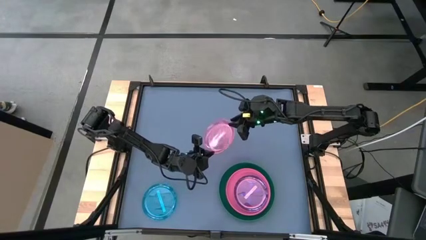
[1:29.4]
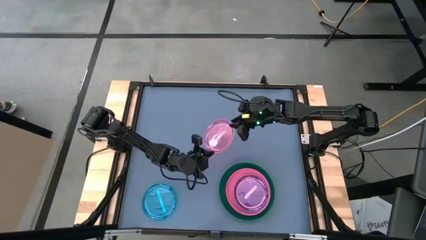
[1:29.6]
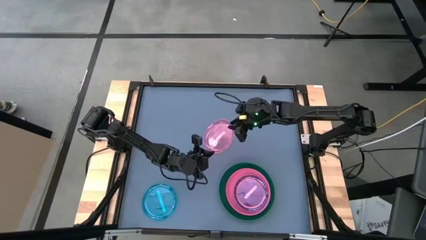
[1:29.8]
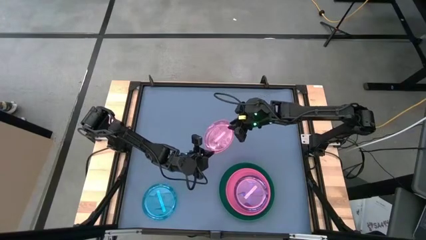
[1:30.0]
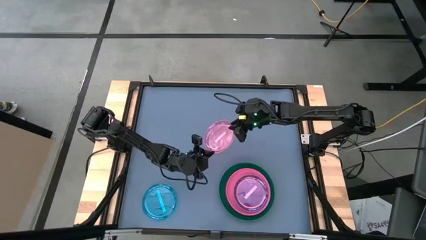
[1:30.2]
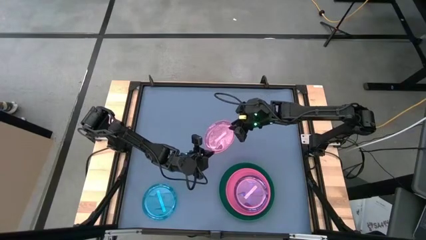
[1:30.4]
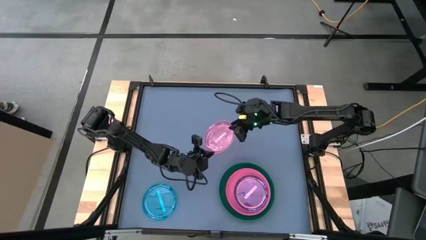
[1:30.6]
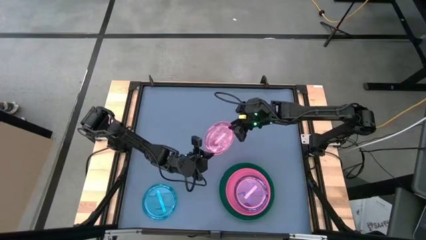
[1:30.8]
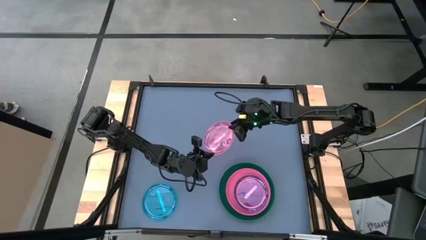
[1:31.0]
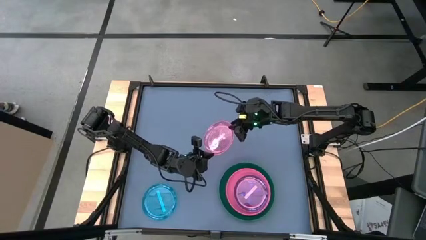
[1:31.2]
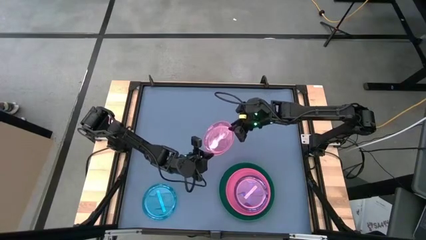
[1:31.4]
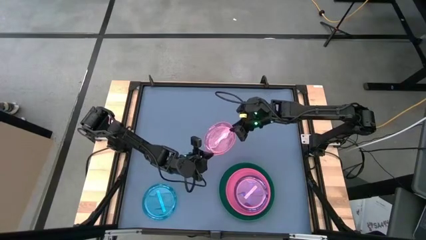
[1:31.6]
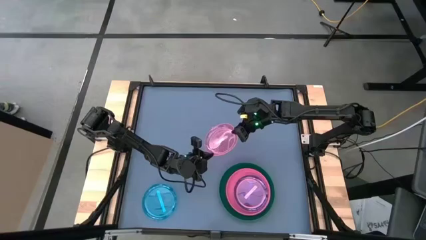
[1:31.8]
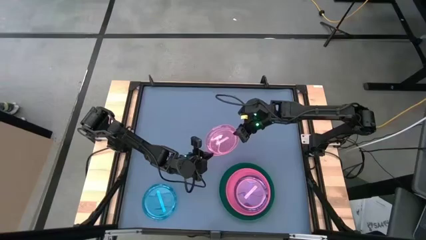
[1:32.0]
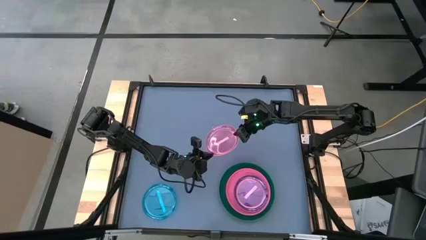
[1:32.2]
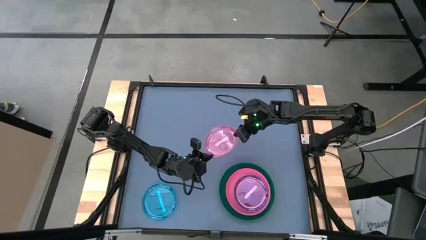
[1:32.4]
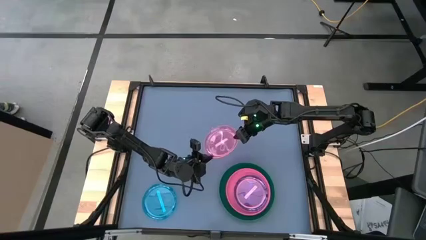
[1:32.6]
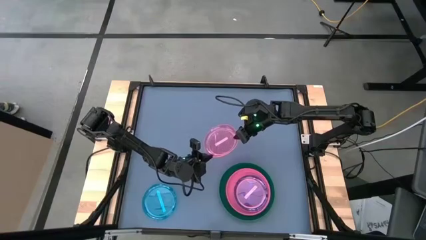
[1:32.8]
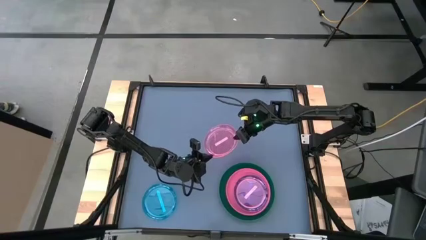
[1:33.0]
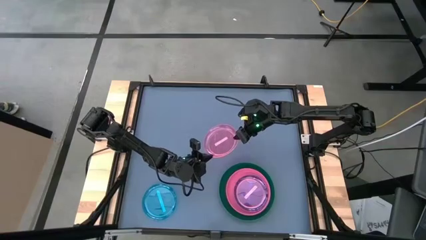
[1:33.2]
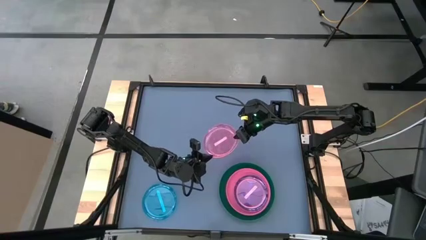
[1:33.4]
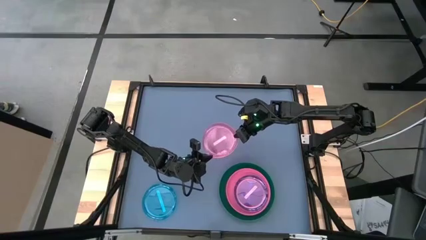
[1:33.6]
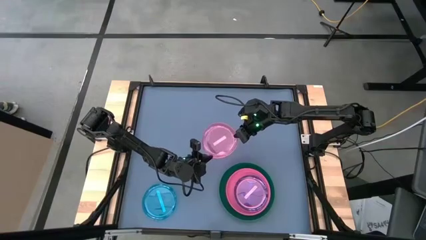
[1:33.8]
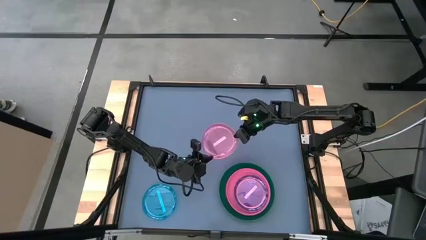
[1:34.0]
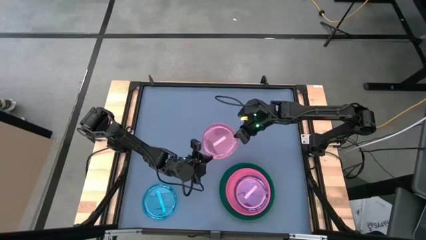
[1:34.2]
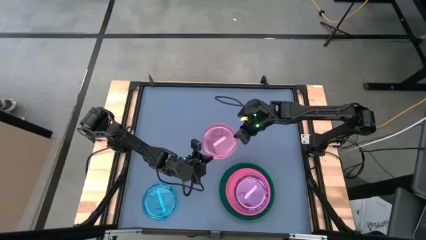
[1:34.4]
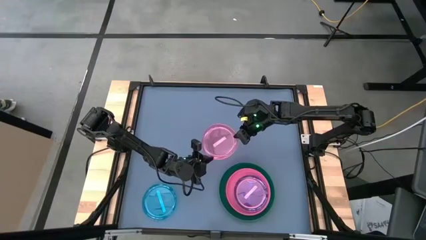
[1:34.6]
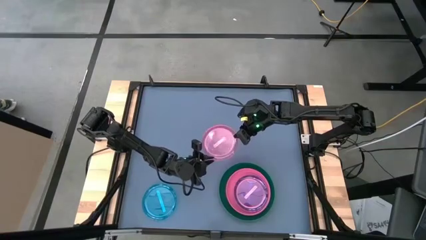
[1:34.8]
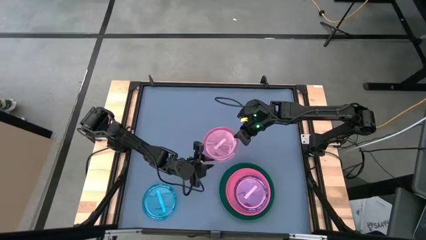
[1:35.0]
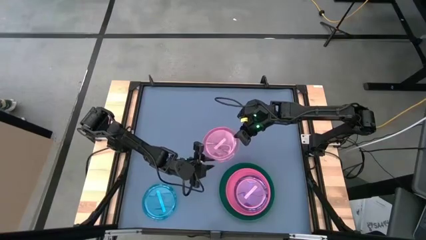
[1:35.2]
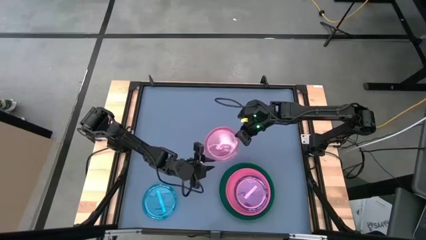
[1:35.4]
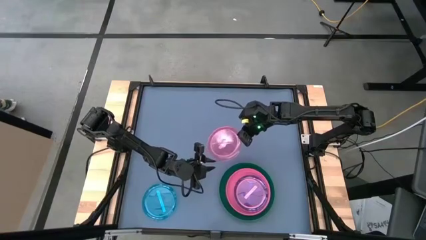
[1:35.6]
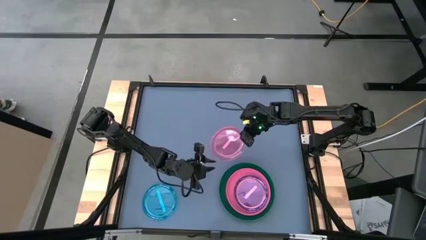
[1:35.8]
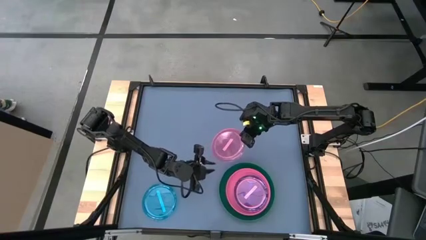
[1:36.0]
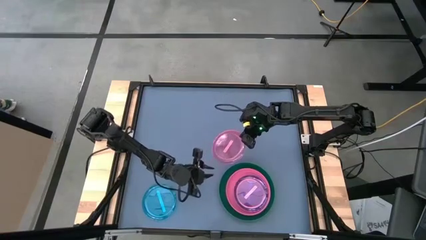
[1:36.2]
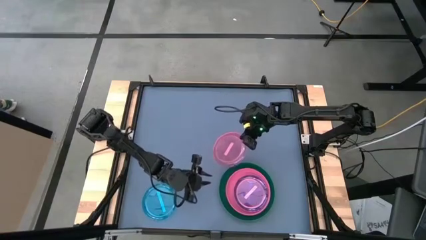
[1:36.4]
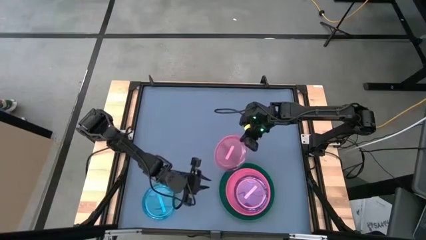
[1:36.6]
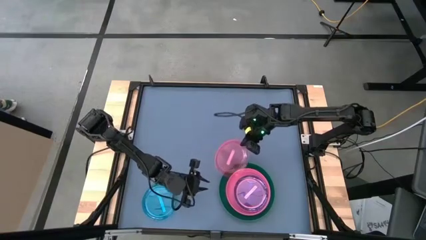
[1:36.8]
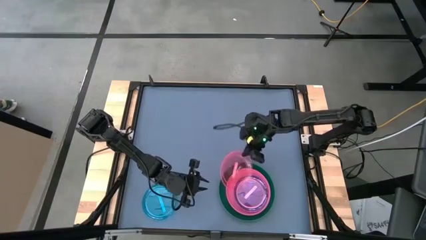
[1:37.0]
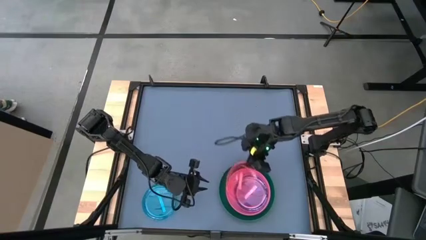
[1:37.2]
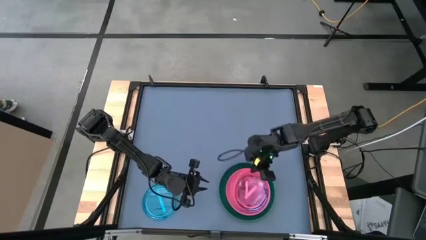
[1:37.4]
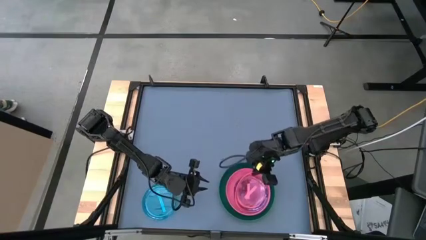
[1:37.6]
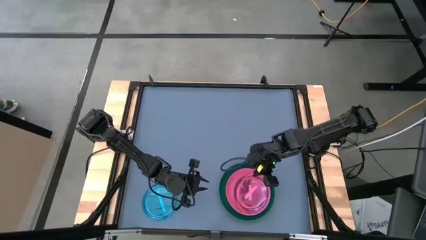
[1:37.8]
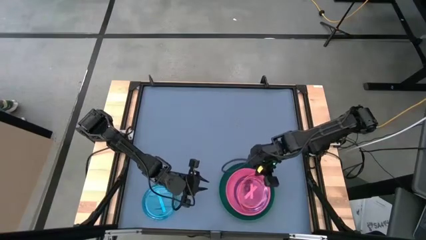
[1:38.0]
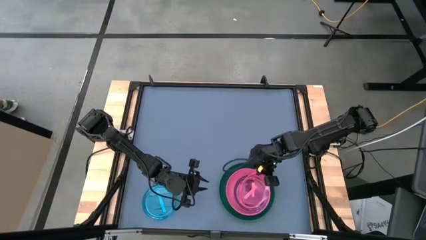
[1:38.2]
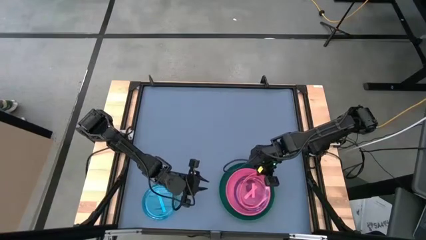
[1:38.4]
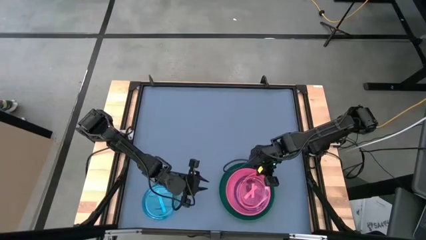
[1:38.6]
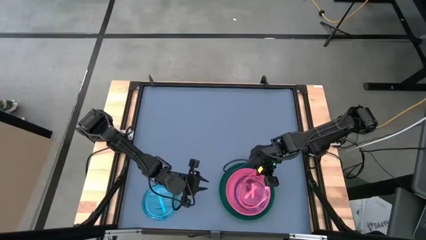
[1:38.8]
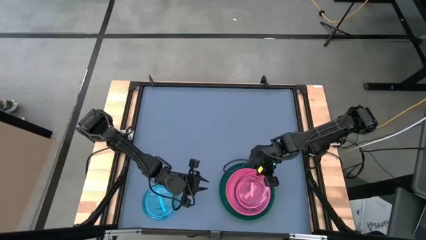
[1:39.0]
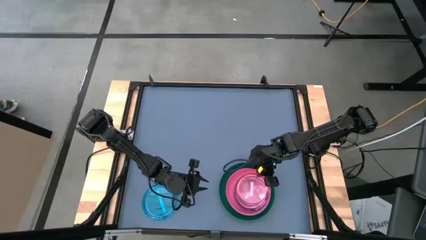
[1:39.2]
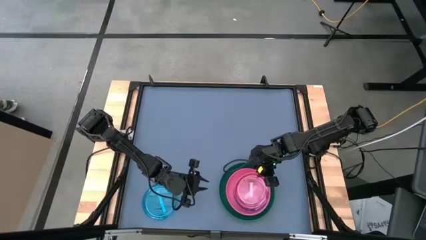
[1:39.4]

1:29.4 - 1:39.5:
Task: Stack plastic plates
Stack the light pink plate on top of the light pink plate

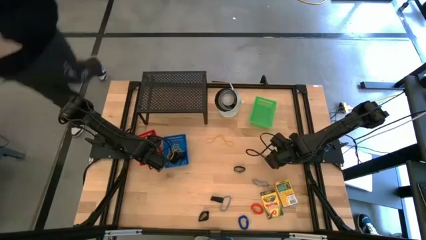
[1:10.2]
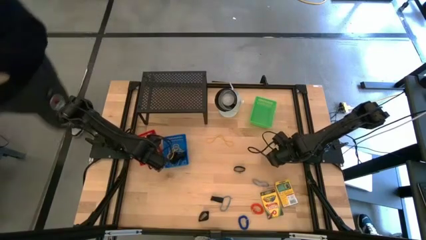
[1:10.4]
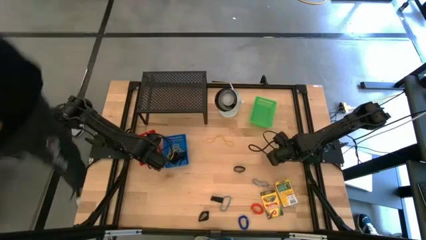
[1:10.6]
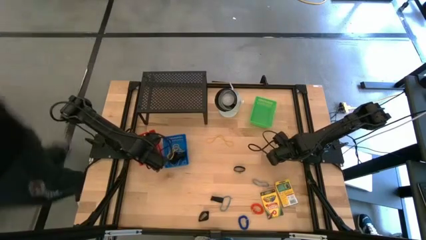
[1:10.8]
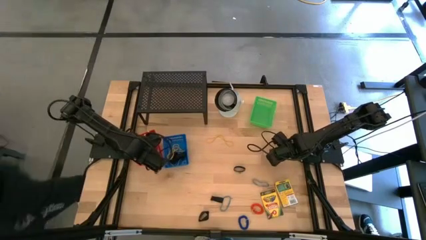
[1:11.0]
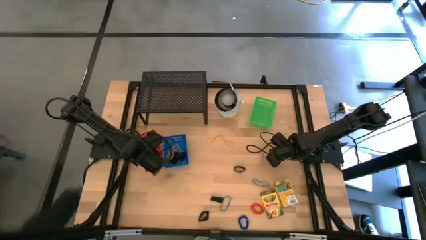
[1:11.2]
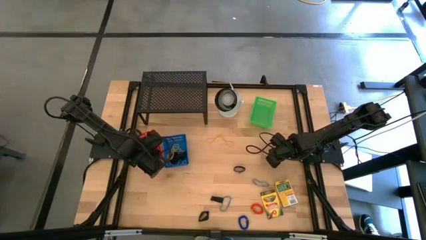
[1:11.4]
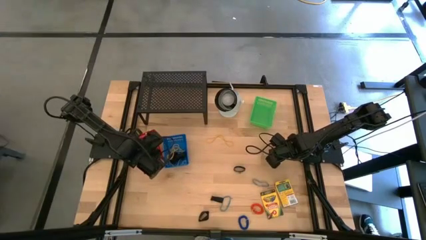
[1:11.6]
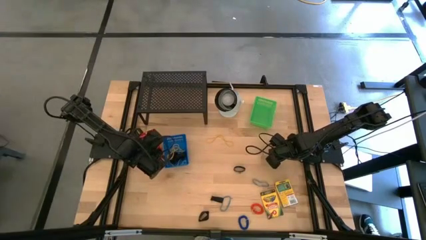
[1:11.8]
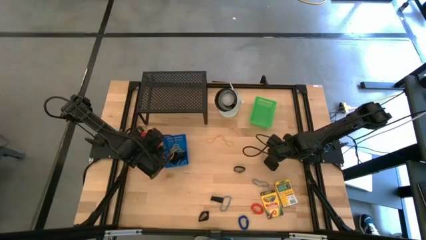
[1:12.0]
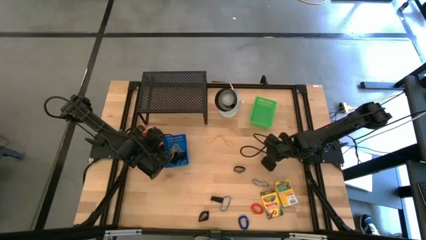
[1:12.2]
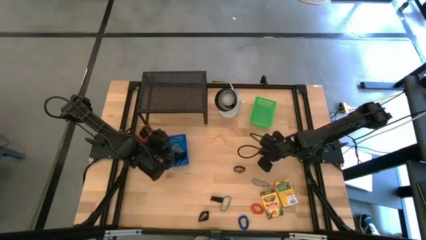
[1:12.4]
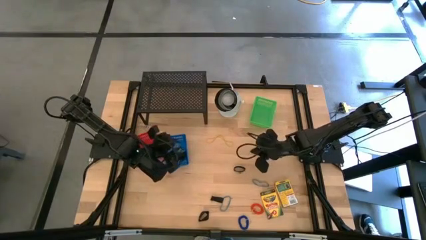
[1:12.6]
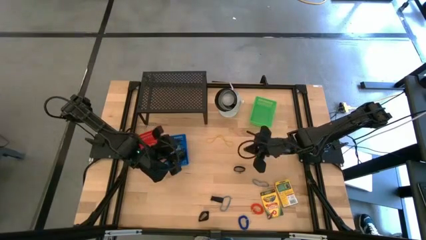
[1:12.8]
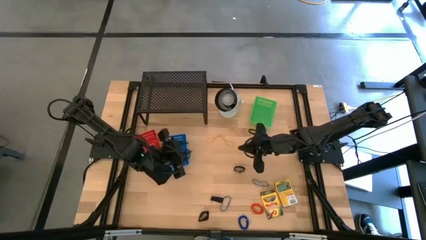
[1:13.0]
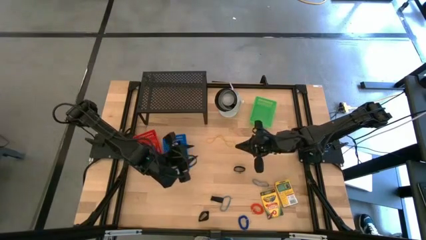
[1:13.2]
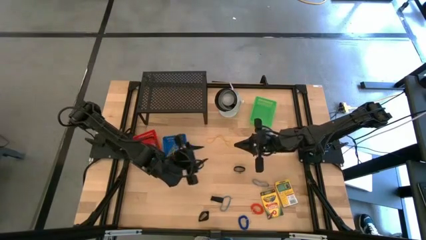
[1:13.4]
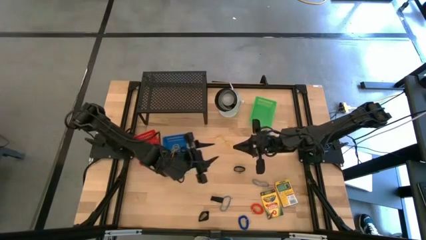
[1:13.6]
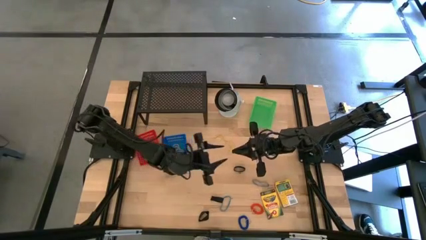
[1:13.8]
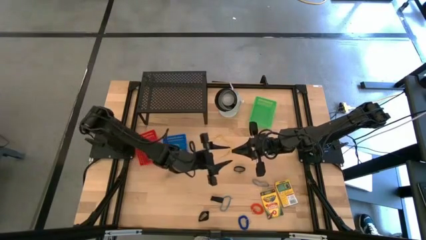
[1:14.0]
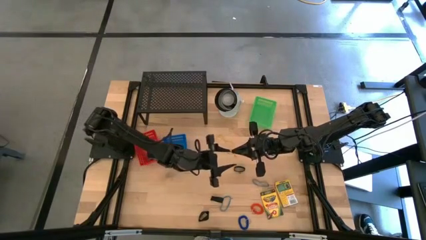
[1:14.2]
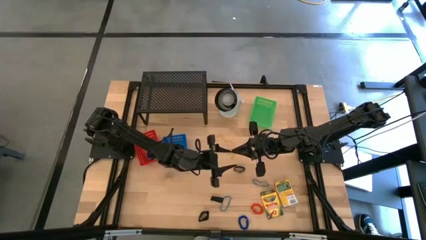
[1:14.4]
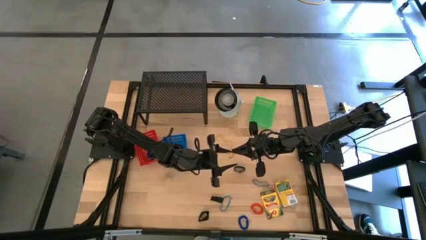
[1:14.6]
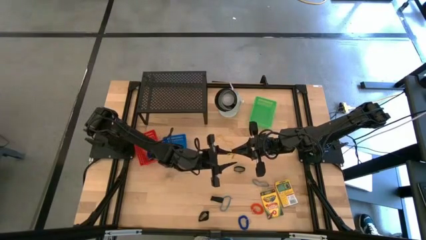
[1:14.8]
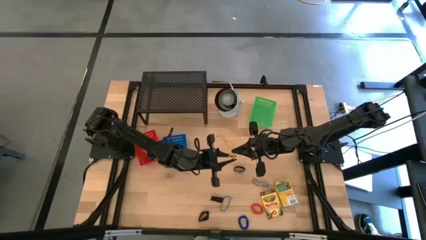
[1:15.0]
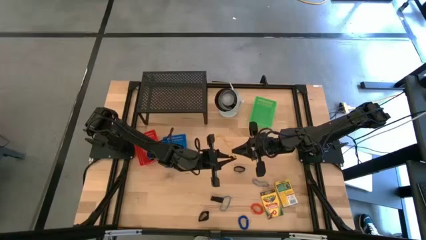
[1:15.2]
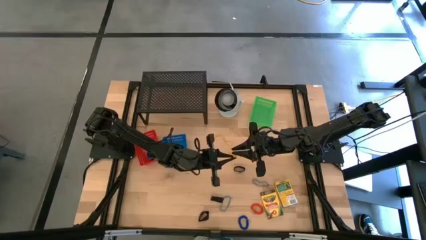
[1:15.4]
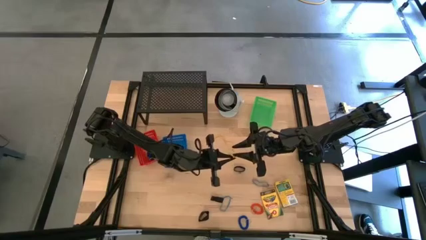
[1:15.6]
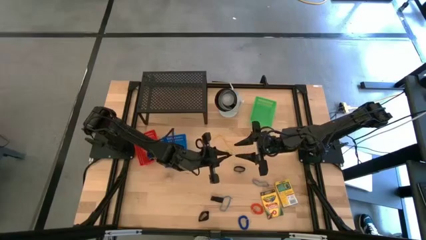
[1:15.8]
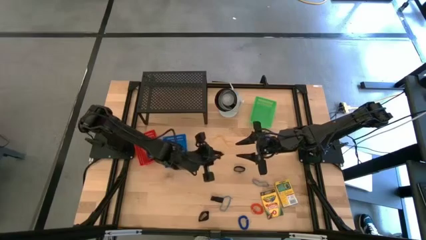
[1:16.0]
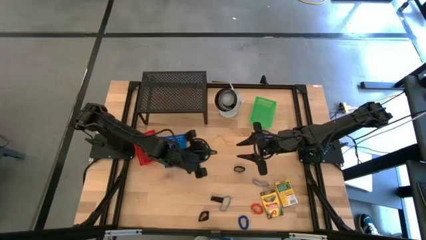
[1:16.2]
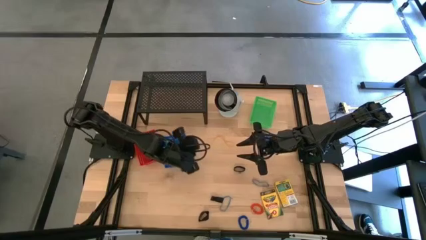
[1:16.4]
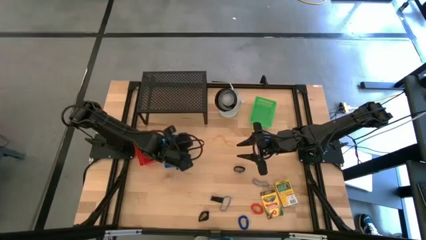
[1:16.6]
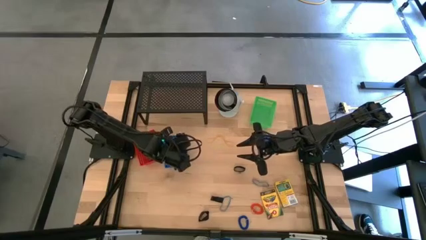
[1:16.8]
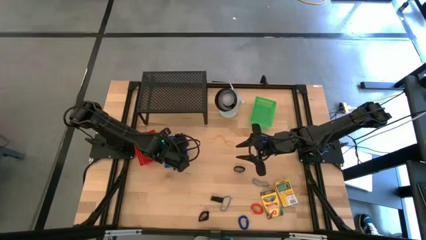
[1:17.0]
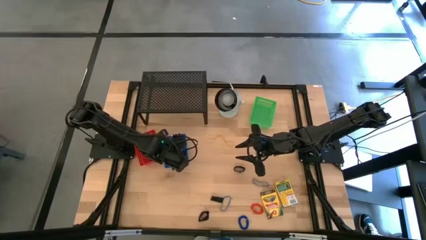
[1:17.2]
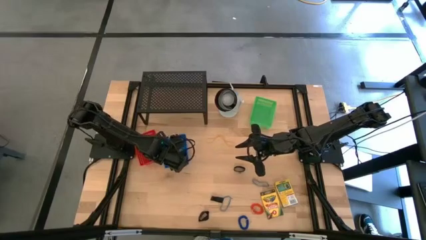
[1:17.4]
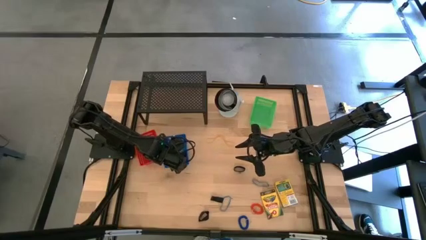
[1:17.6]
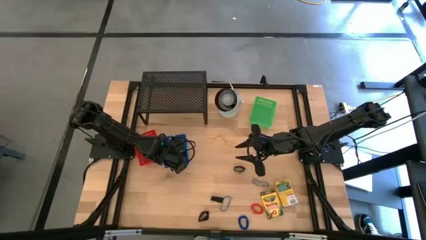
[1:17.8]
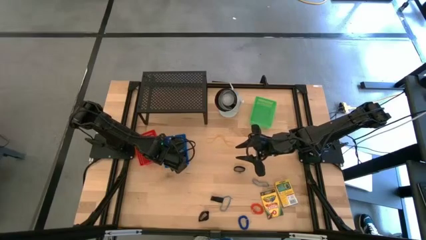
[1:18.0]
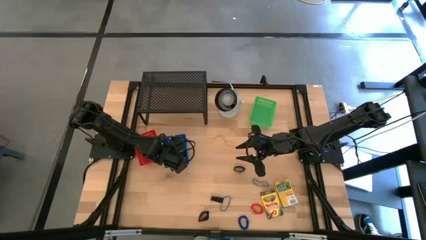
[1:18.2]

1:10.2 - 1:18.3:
Task: Pick & Place Office Desk Supplies
Put the yellow rubber band into the blue bin
